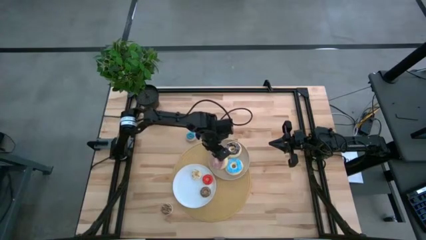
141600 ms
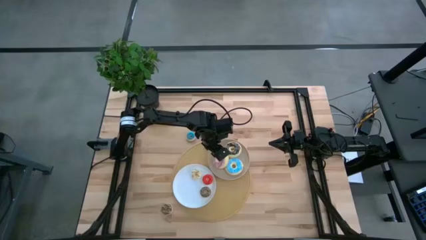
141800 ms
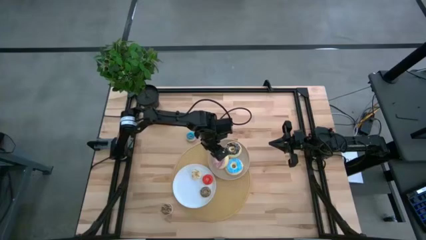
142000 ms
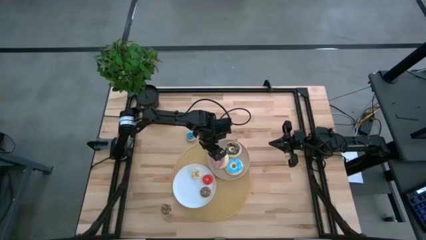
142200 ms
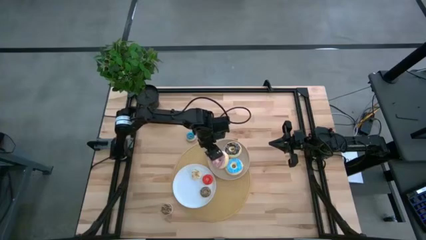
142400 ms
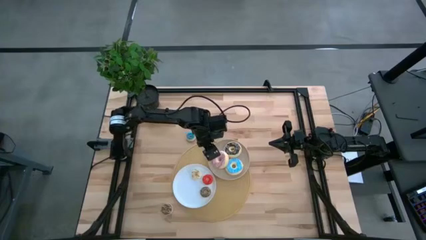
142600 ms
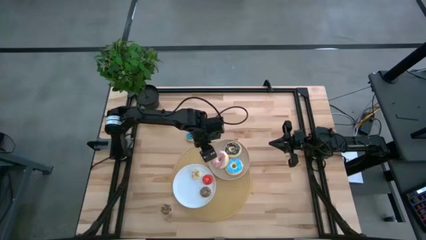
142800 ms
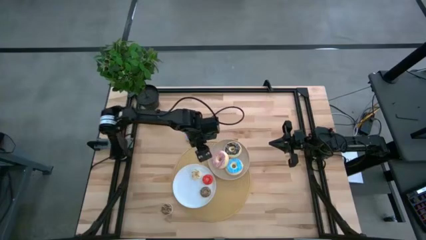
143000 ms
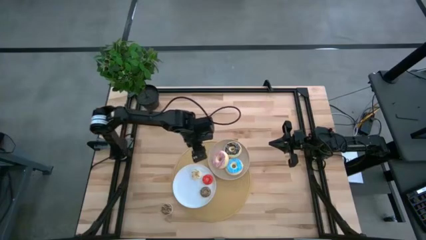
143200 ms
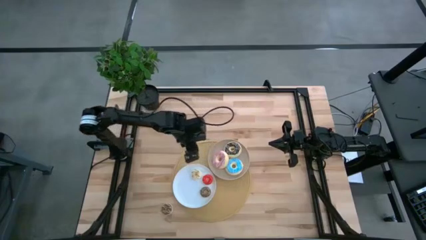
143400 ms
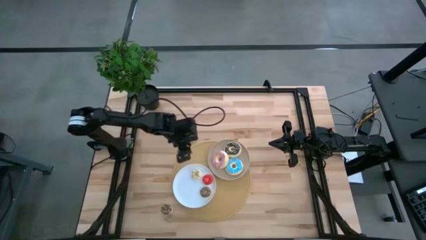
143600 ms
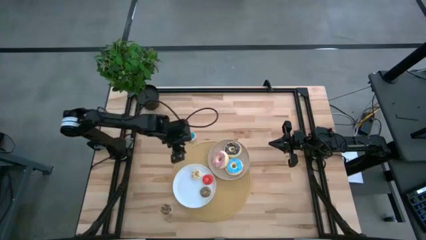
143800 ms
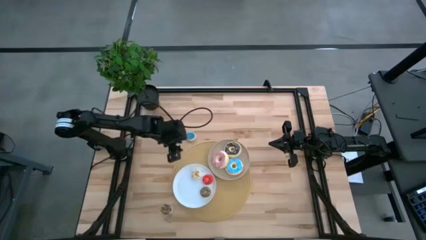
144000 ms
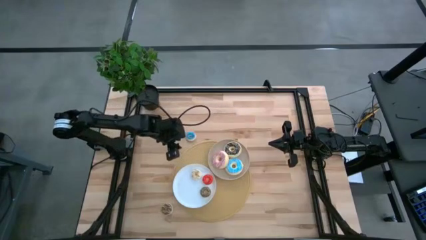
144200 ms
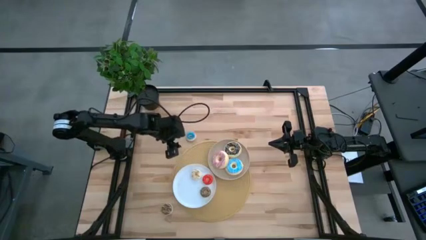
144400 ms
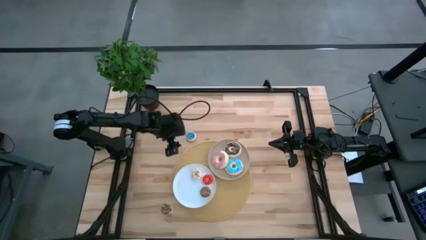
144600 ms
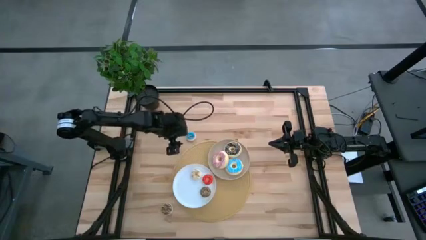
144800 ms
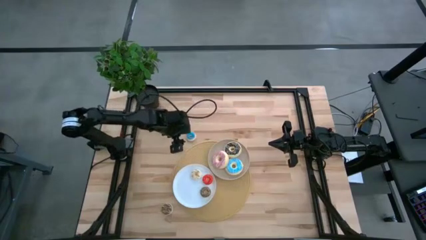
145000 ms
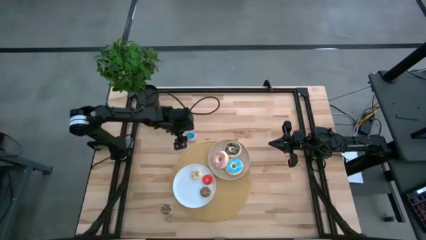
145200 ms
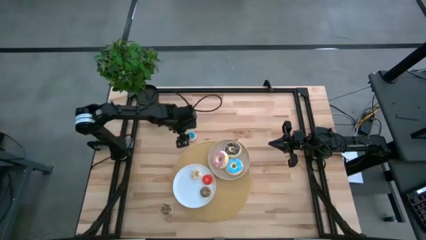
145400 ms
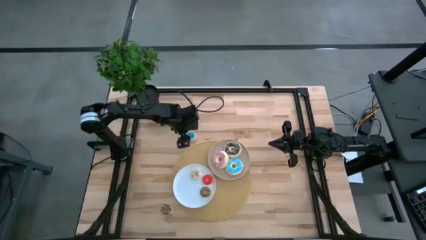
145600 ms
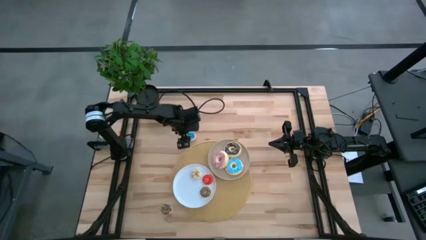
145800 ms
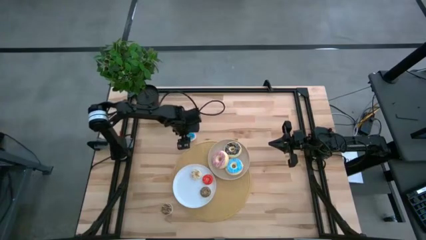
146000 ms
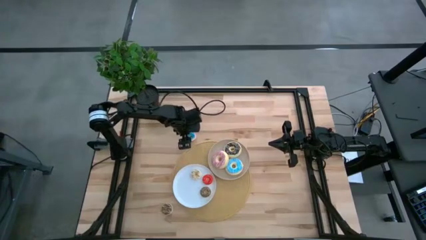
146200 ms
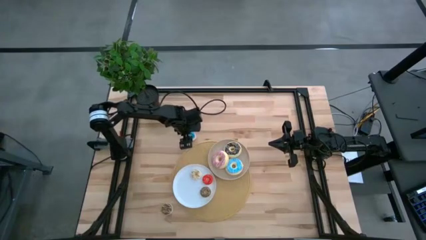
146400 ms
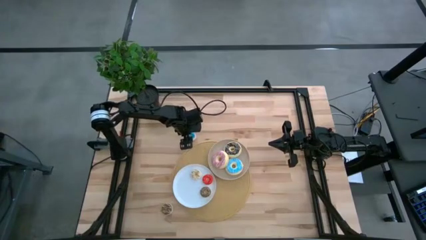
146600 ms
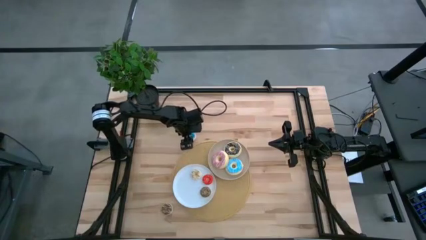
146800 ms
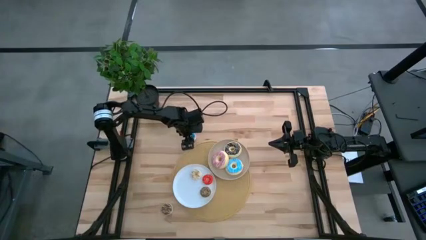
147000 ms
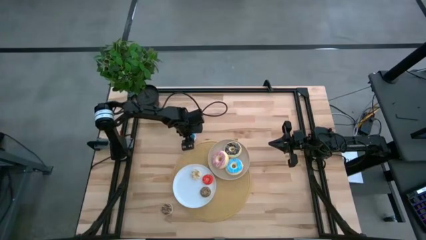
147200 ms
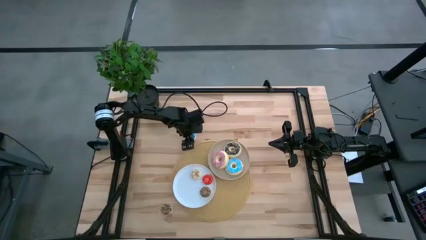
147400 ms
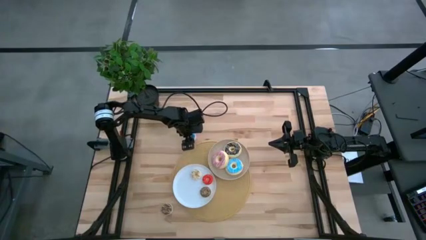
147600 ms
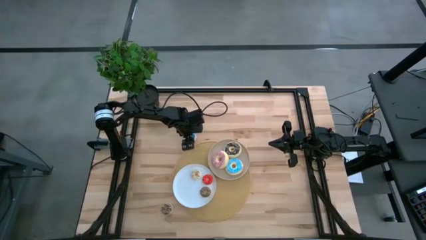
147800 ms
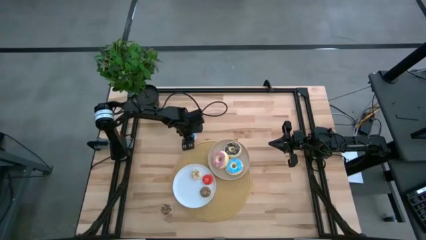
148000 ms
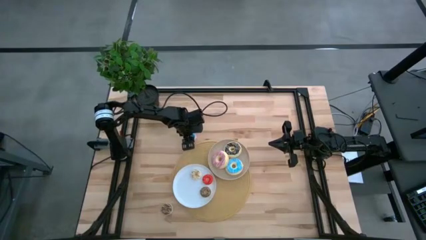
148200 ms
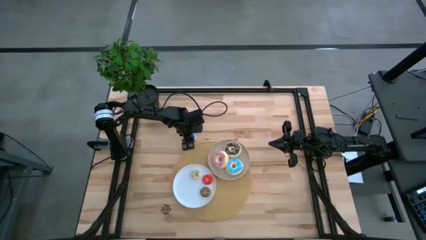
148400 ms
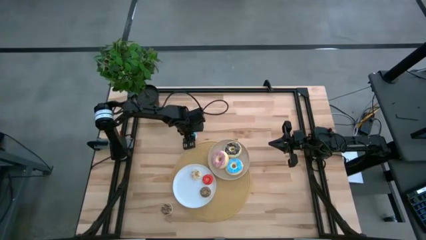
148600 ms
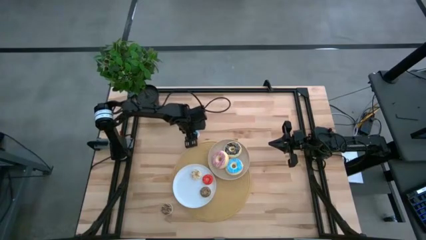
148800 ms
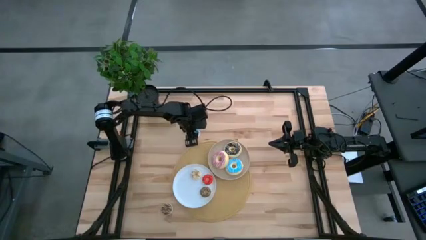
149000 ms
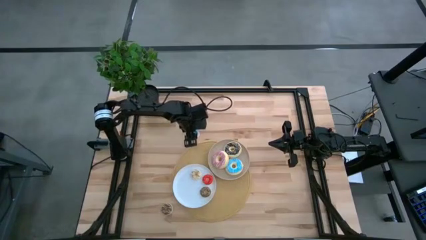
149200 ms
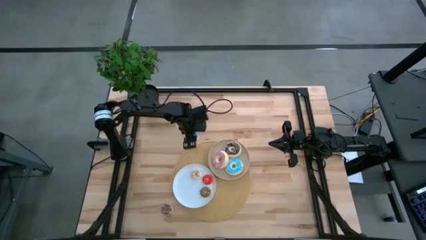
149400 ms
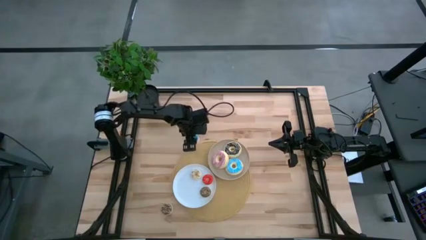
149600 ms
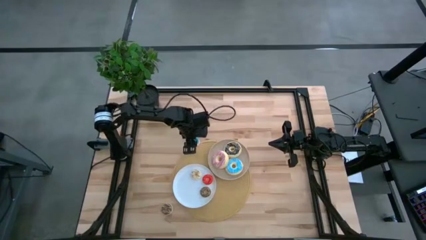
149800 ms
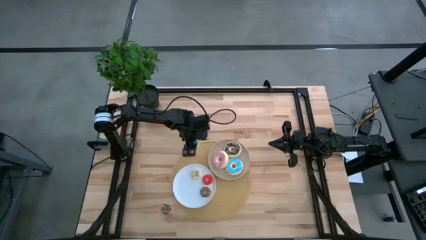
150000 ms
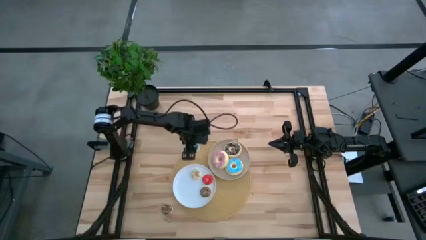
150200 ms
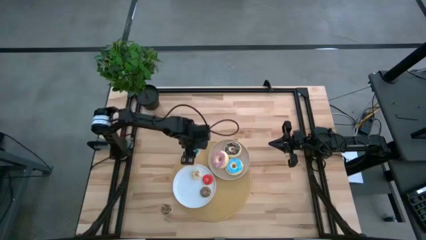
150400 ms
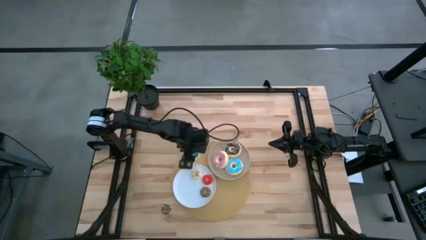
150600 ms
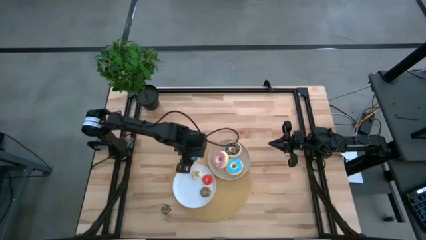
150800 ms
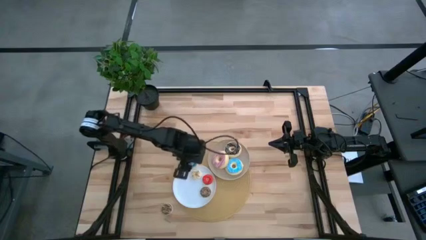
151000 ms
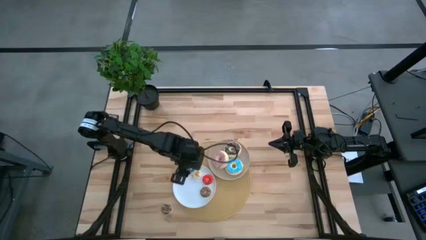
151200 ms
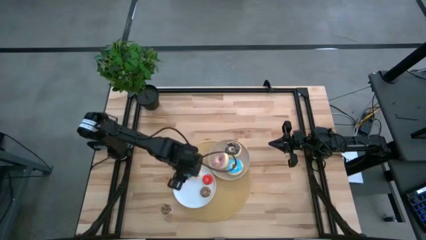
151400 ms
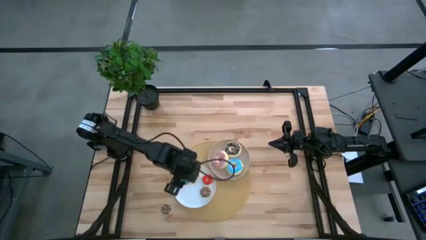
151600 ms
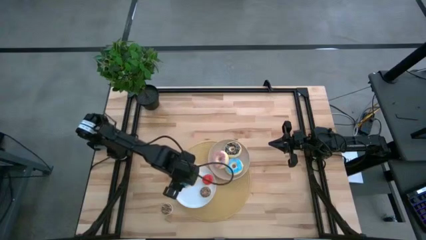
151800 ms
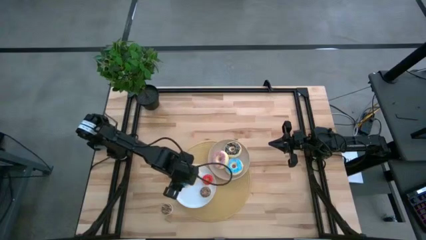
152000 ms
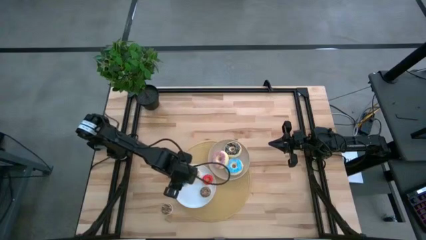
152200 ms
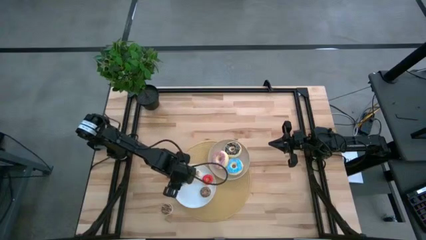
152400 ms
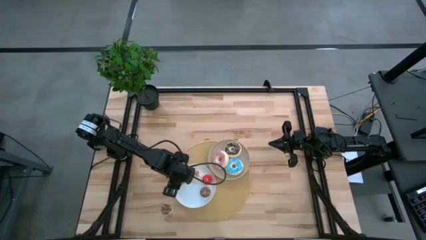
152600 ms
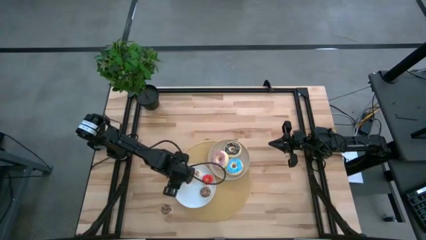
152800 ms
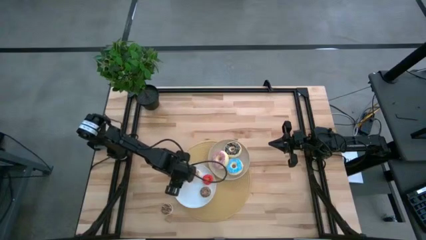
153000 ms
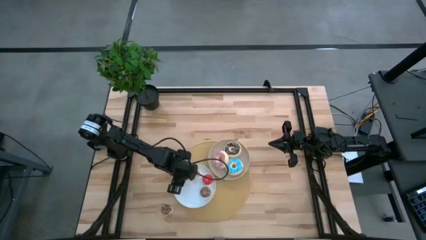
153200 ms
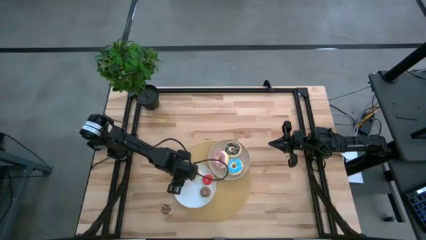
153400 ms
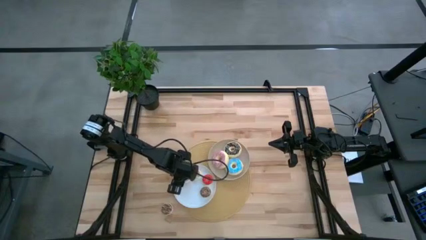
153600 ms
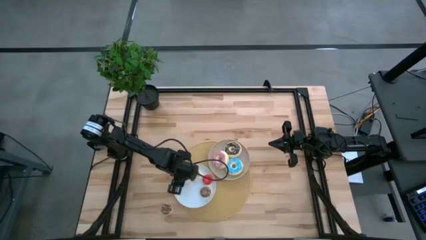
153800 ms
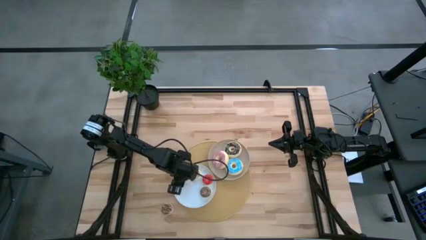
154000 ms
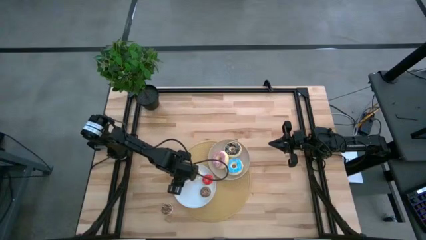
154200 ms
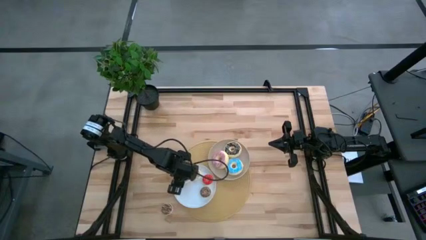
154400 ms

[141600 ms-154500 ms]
Task: Pick & Place donuts
Put the small blue donut on the white plate

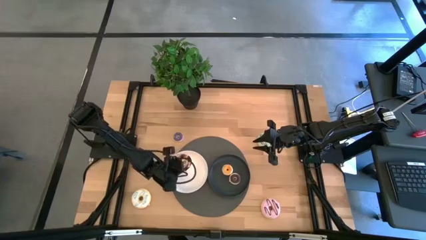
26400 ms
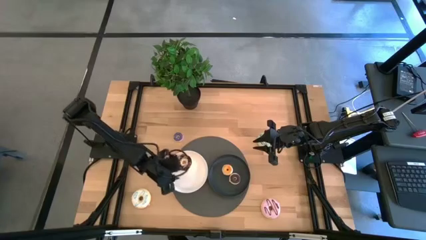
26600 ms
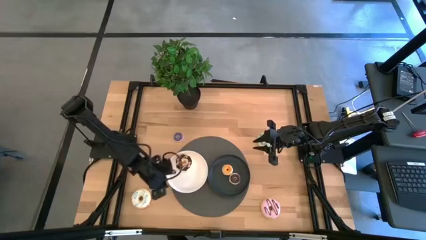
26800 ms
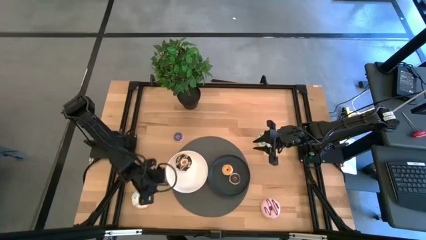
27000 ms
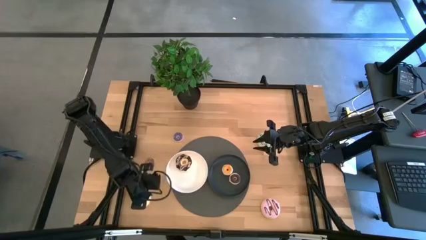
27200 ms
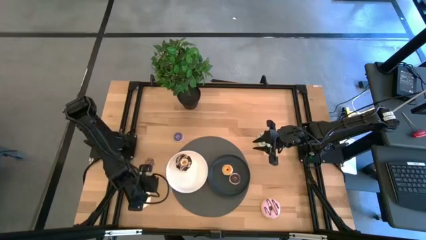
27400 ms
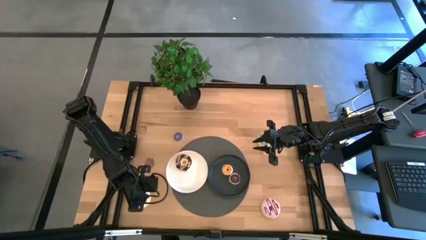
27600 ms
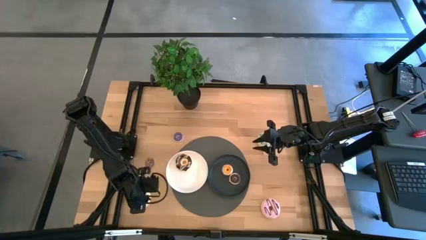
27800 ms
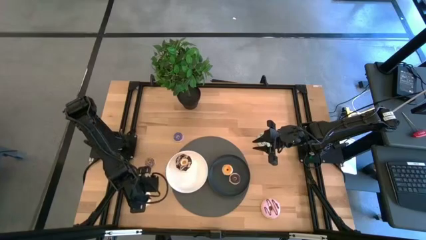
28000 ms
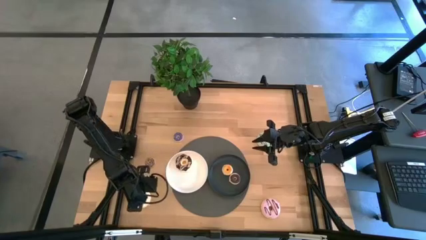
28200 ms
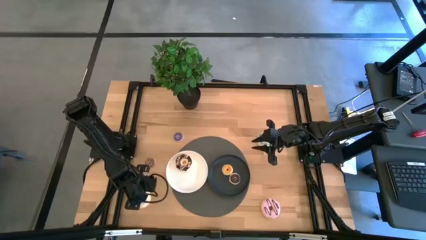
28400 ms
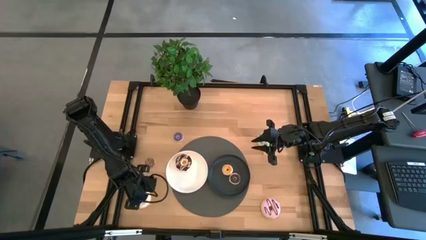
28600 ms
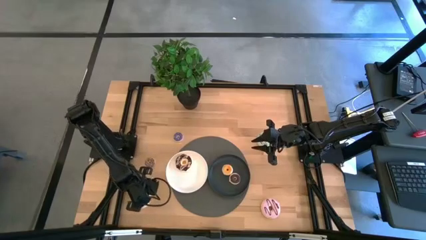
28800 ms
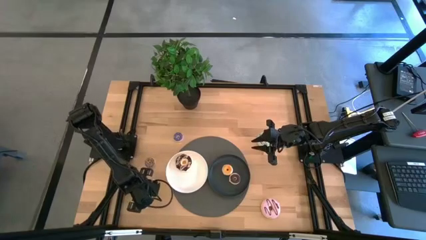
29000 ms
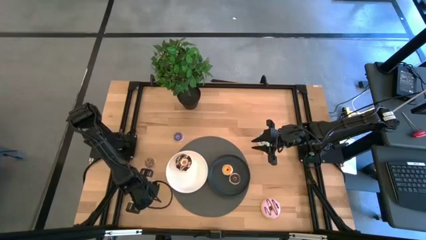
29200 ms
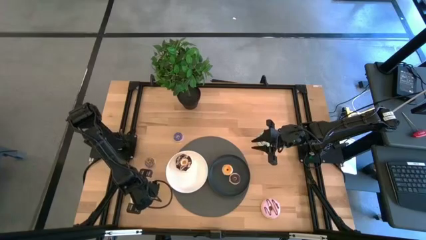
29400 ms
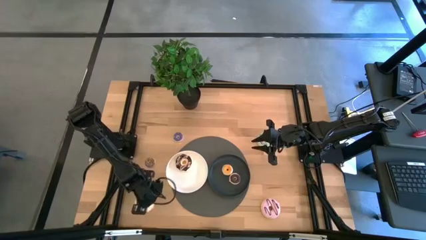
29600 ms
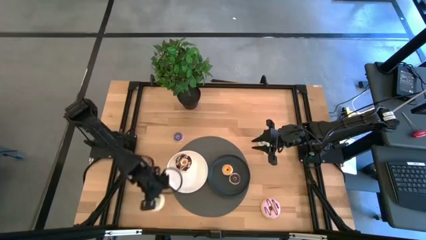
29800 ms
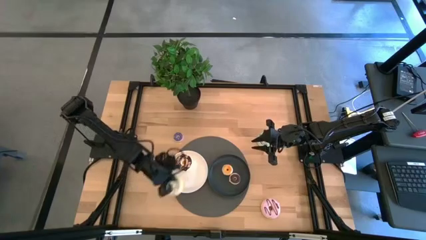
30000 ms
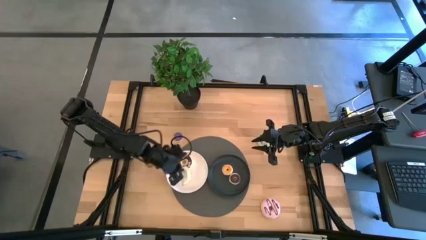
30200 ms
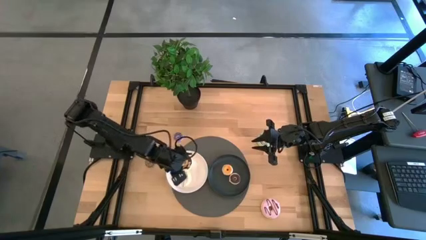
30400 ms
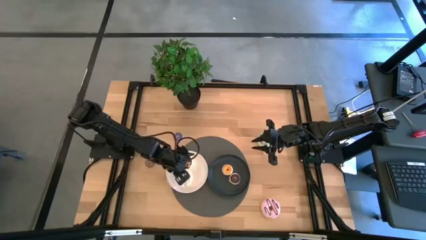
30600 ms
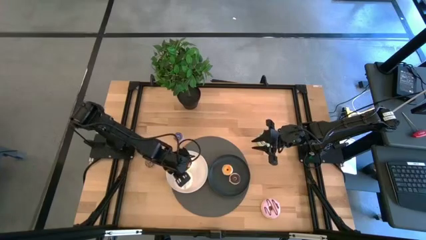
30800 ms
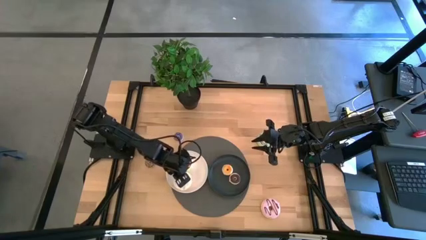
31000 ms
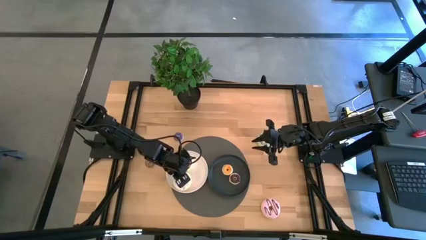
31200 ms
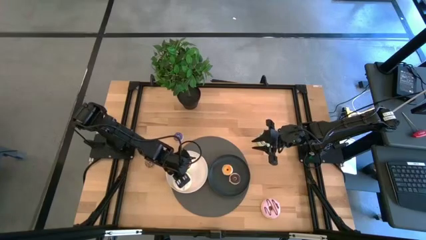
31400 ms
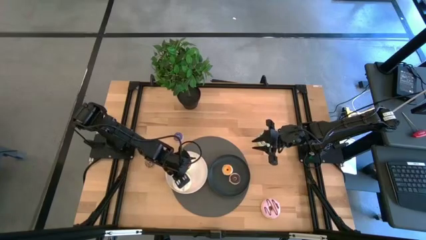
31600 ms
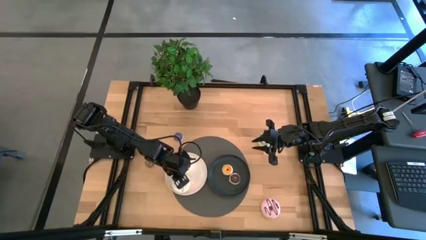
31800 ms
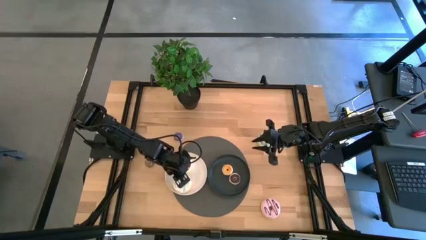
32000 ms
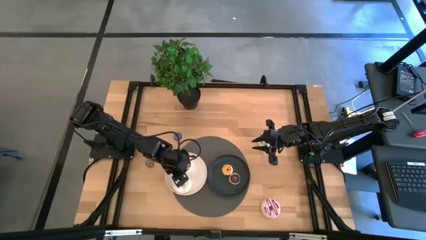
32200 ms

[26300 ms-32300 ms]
Task: Pick & Place donuts
Put the large white donut on the white plate
